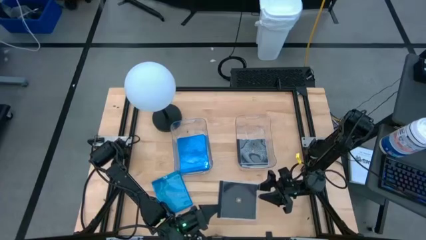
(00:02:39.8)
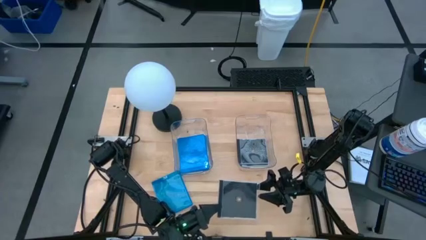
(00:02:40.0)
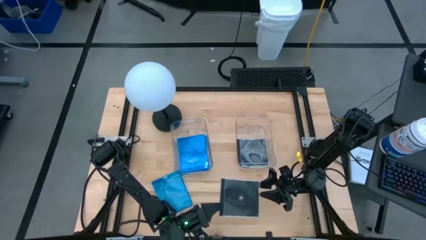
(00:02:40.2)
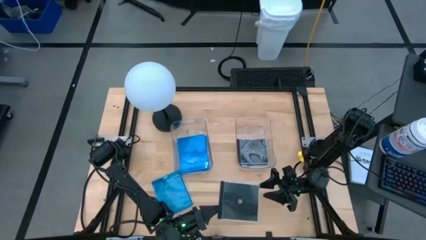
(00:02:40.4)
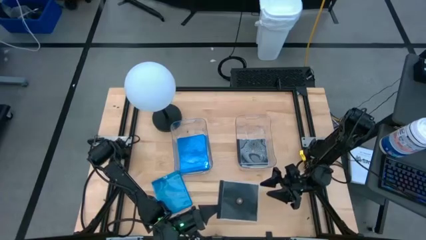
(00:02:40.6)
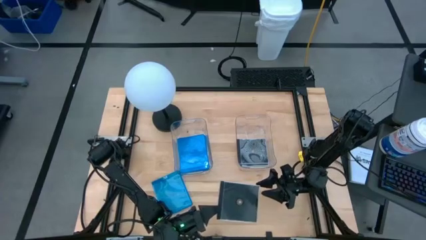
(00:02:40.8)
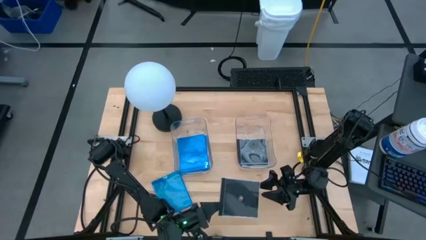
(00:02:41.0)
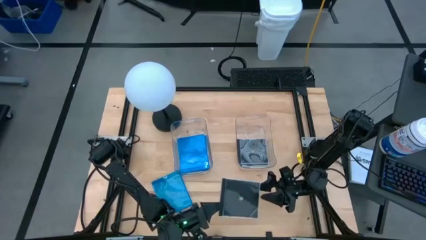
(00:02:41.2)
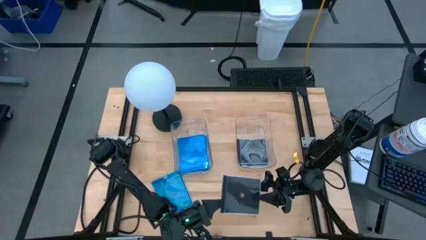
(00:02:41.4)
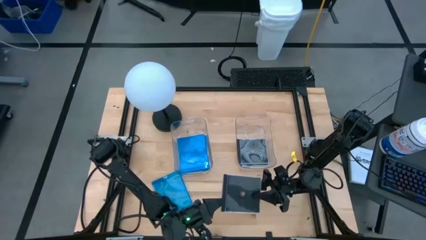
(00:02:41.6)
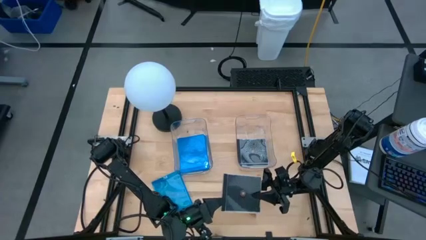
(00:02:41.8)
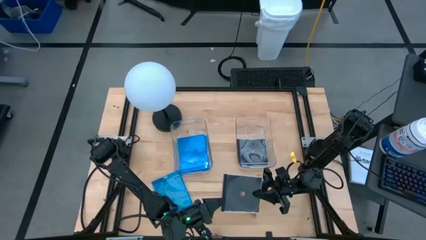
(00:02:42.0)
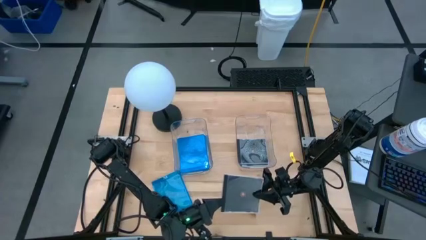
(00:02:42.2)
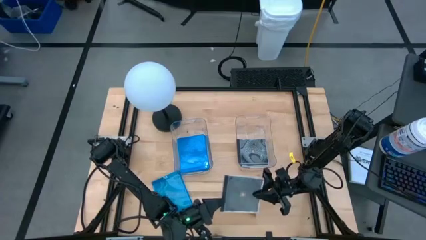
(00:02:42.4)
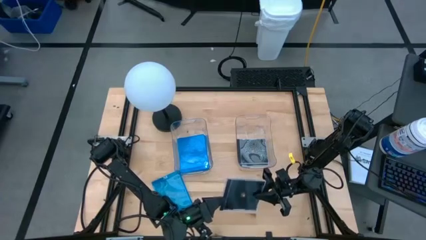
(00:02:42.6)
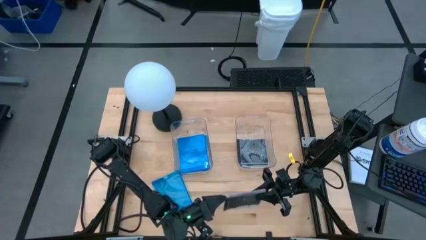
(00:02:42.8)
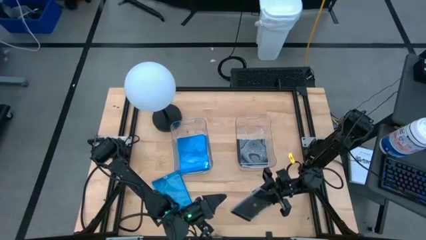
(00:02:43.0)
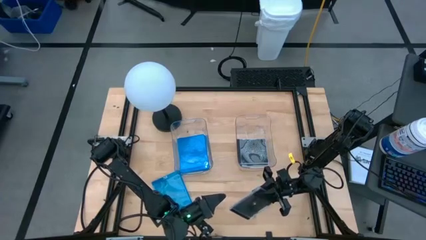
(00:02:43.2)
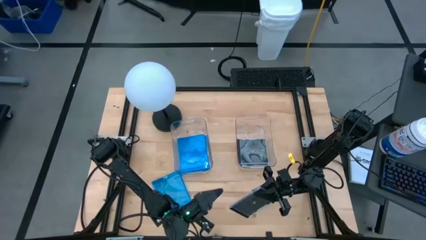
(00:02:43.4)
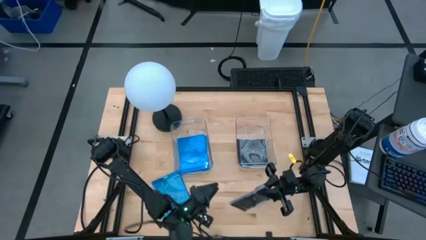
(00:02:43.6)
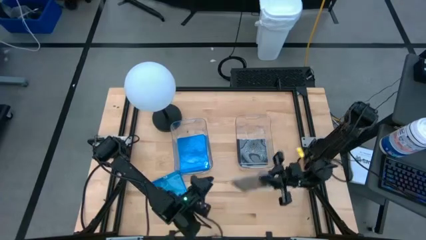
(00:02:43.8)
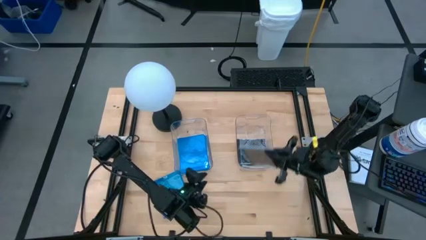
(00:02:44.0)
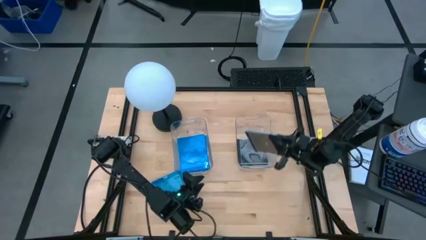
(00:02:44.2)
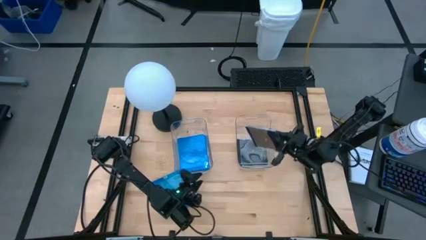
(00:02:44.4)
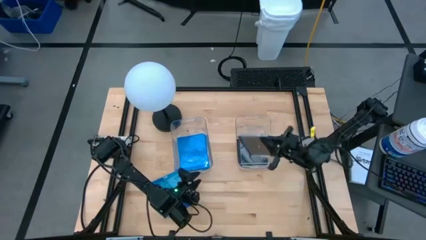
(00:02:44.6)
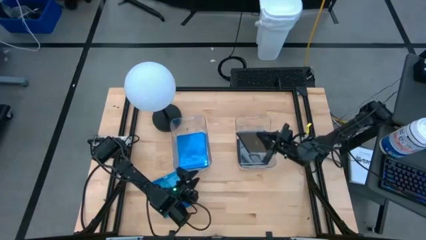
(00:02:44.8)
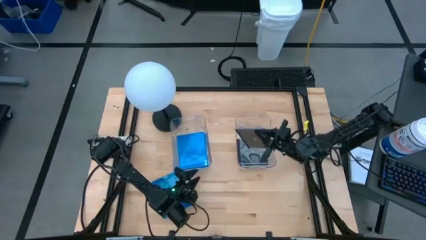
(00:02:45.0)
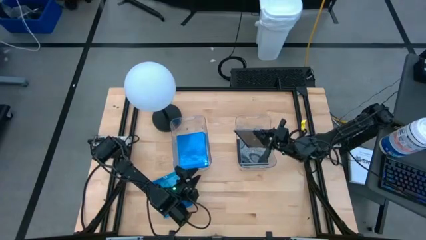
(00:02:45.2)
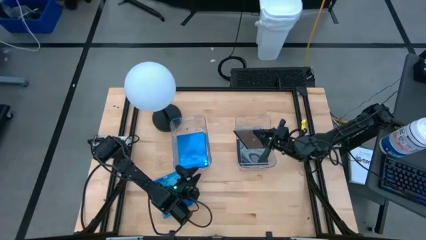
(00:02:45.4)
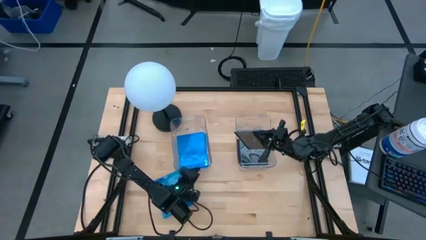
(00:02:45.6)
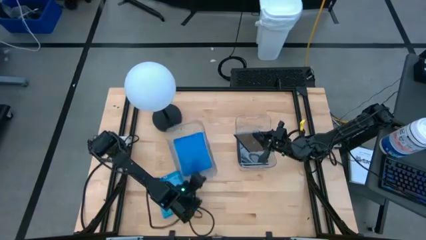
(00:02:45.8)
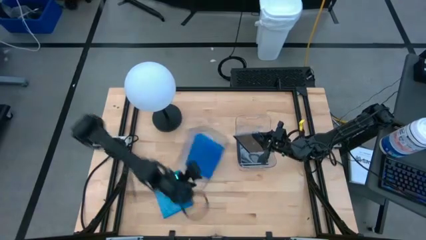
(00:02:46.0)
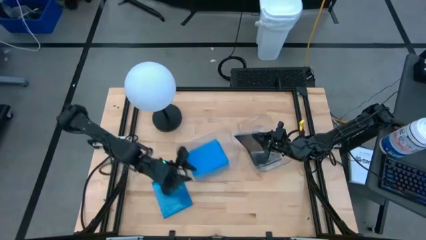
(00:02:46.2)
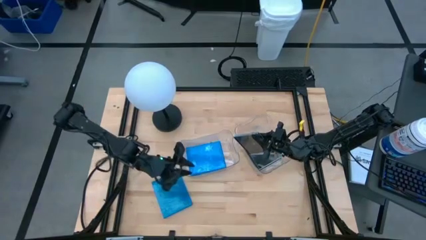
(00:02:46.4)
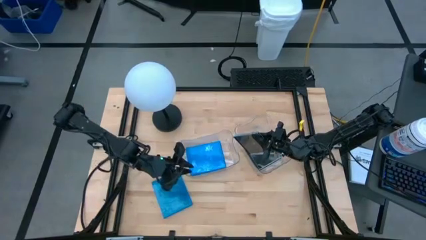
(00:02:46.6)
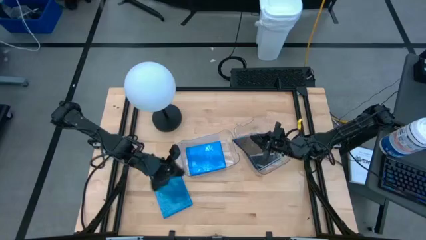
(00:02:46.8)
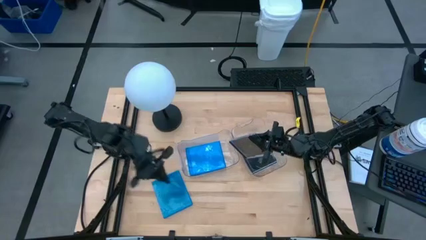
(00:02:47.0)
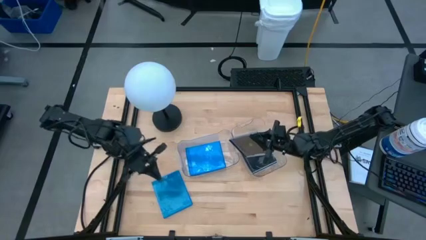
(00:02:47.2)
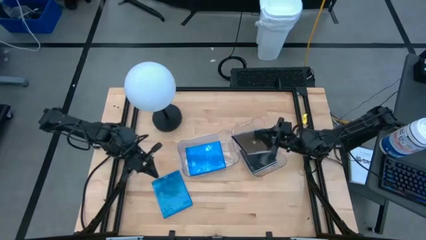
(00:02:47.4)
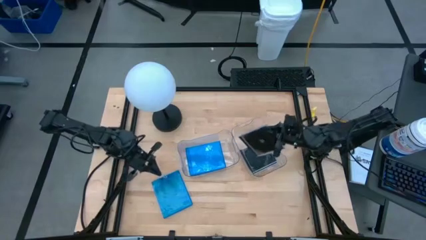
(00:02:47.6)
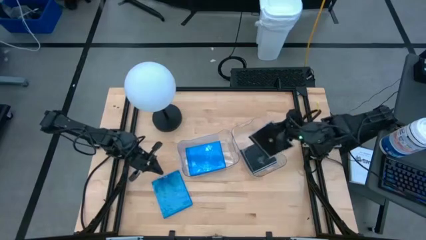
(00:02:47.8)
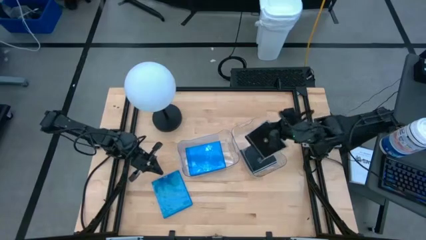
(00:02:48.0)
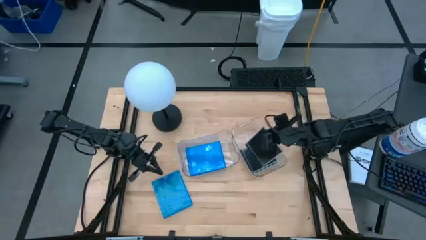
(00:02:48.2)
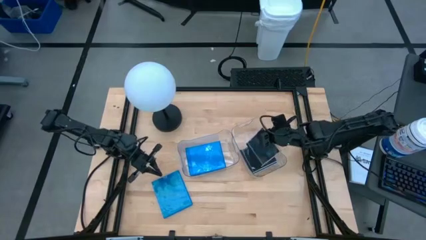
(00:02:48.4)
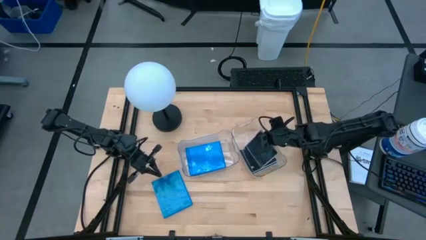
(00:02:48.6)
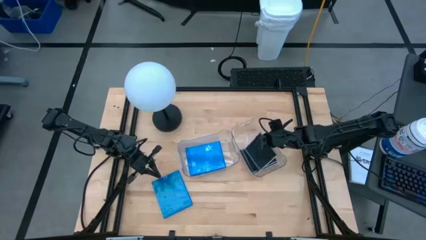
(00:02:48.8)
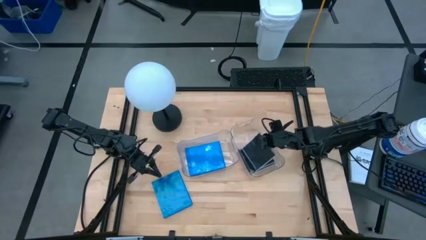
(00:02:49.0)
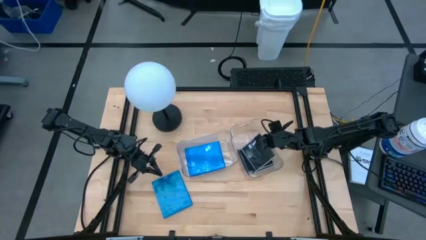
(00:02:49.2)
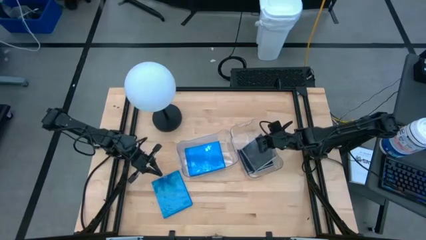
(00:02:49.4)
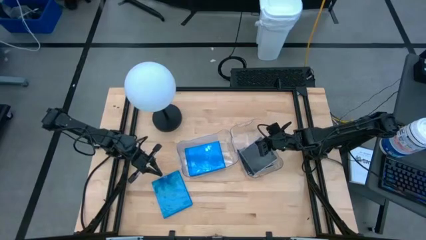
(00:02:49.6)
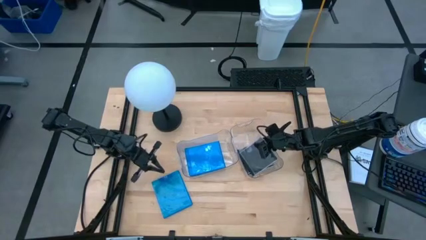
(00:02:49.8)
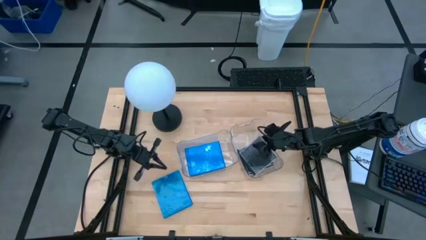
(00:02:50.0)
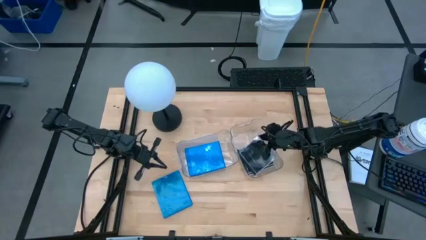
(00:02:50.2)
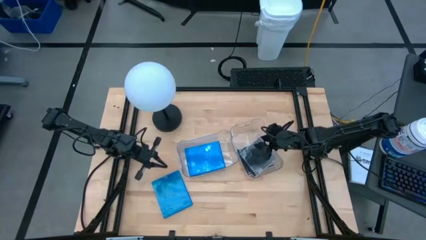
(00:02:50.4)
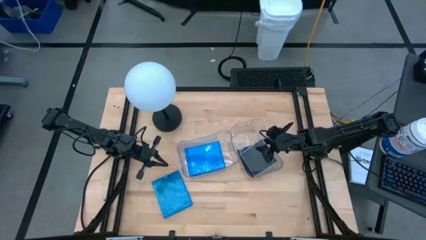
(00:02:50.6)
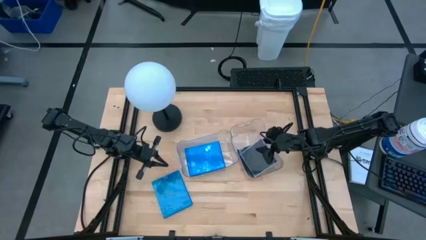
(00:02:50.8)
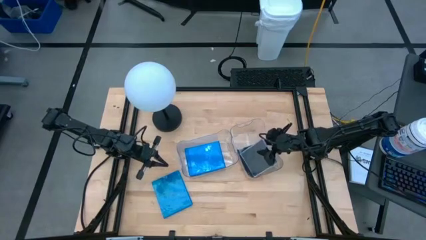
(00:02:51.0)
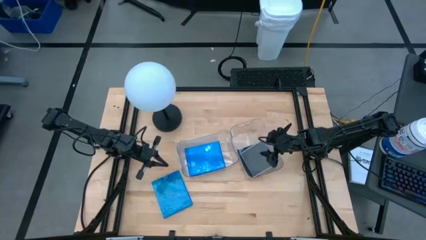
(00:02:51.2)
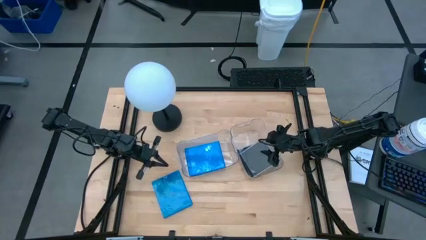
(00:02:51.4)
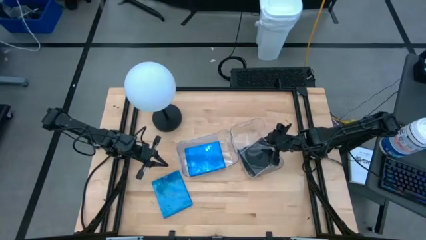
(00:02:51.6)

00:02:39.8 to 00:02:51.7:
Task: Pick & place jewel cases by type
Put the black CD case into the right transparent bin

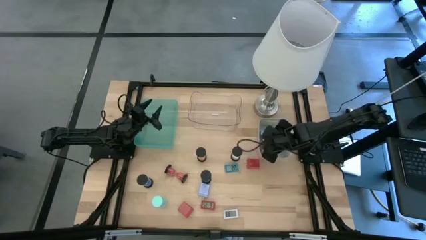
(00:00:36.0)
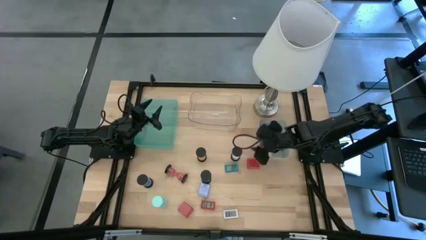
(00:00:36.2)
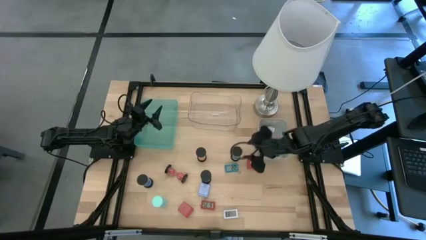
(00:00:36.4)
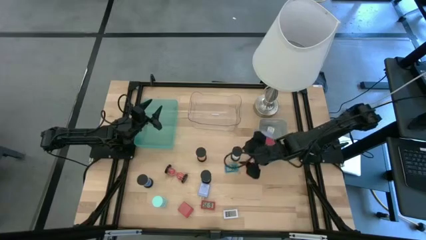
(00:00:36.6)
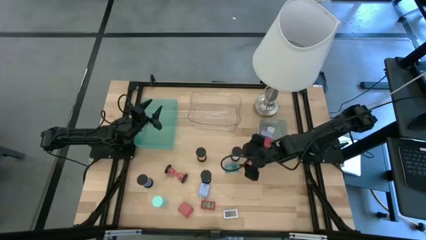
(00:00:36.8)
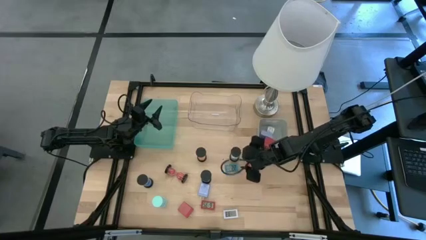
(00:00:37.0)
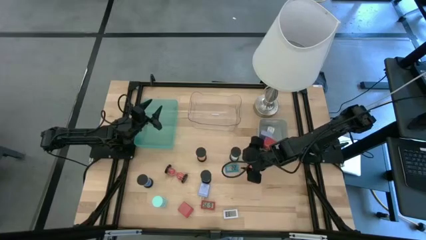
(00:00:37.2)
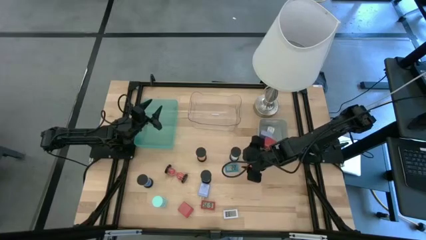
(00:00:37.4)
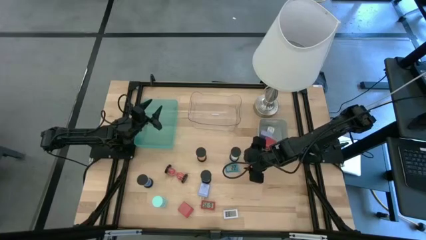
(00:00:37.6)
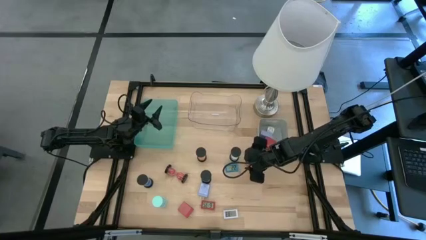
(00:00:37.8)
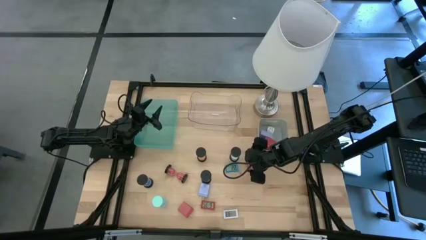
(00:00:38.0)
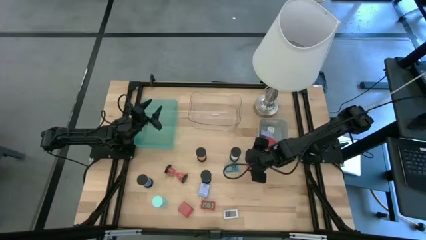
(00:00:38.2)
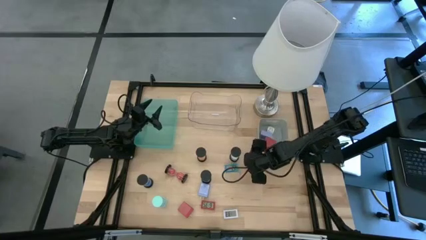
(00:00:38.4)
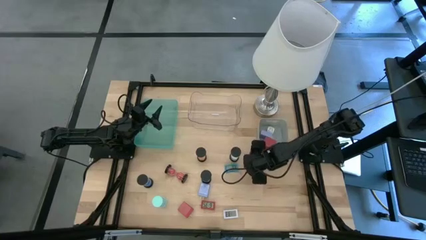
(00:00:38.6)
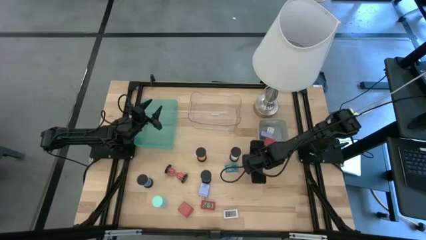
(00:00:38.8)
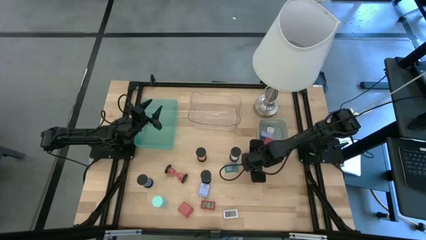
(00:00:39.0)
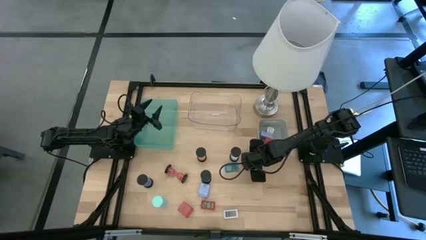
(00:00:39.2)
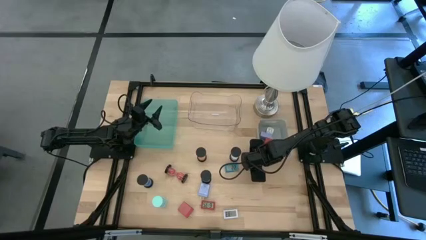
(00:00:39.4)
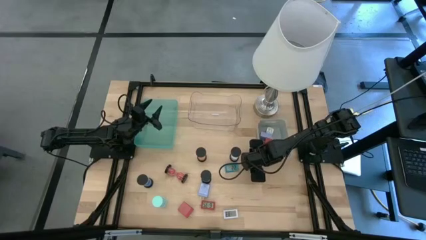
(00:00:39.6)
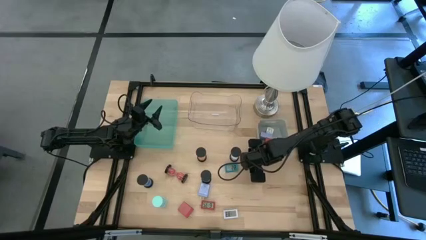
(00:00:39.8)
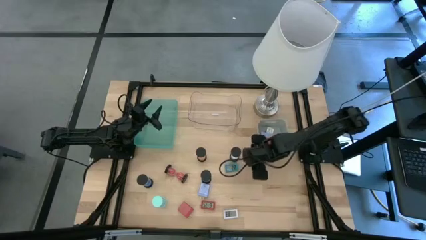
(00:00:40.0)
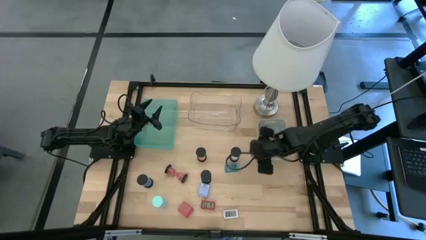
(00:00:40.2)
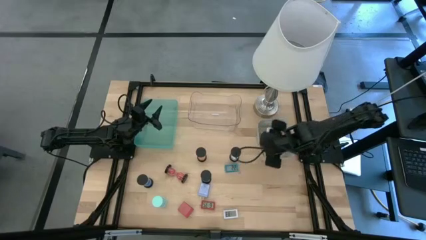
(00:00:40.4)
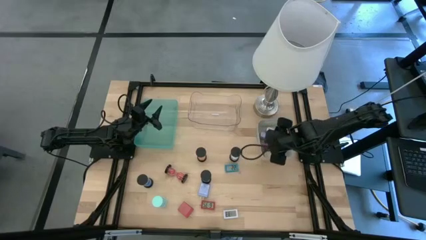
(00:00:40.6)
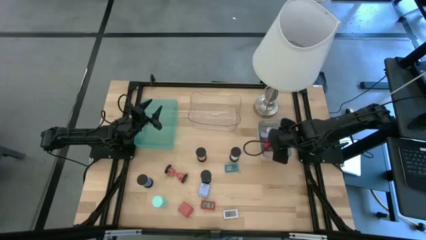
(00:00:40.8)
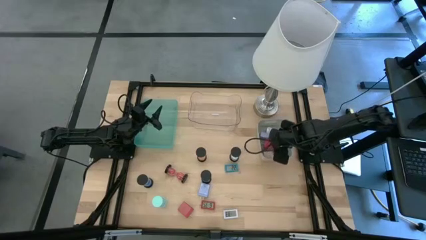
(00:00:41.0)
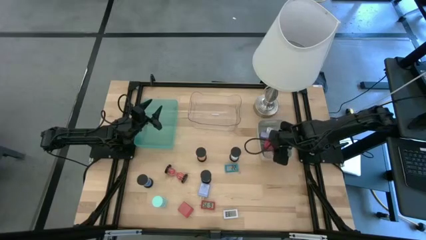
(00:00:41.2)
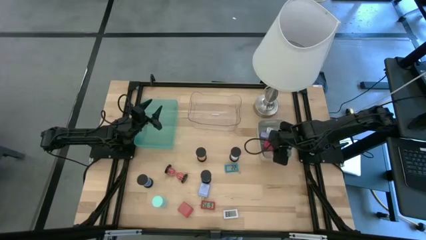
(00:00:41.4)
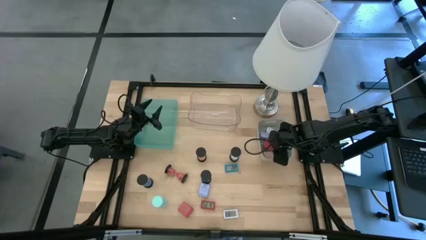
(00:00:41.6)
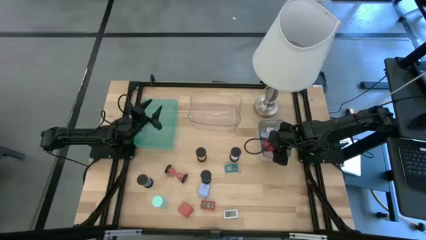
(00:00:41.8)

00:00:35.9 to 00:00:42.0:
Task: Pick & Place Office items
Put the right red charger adapter into the gray bin
